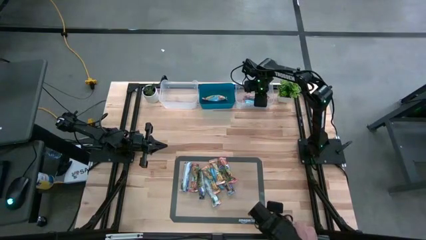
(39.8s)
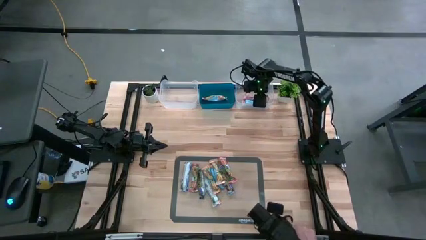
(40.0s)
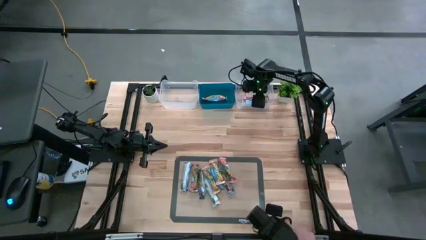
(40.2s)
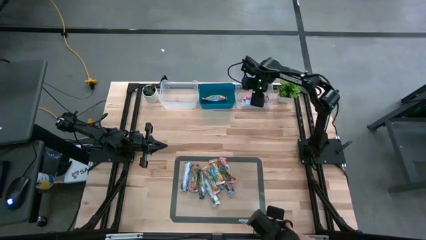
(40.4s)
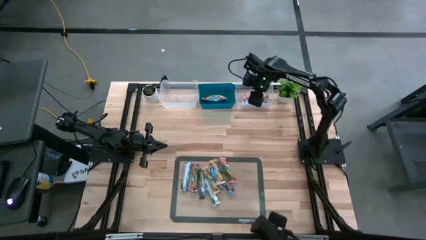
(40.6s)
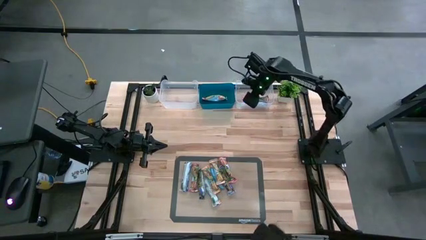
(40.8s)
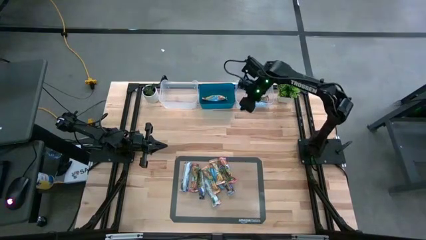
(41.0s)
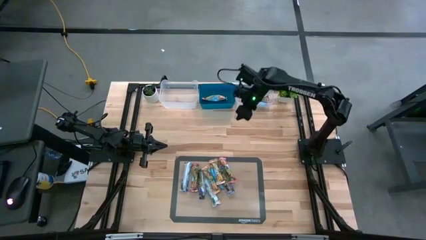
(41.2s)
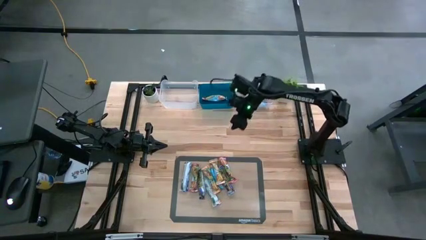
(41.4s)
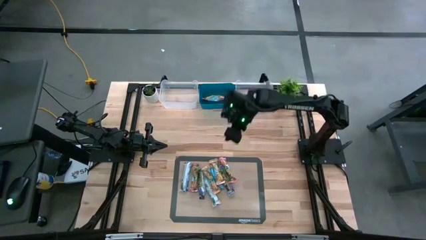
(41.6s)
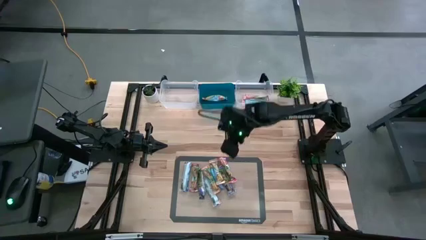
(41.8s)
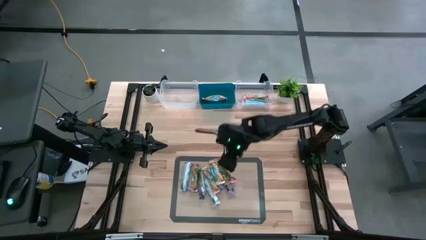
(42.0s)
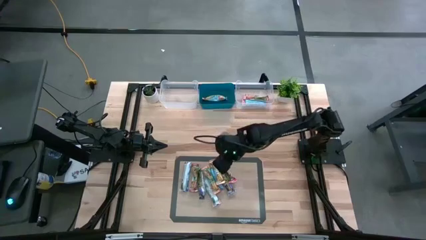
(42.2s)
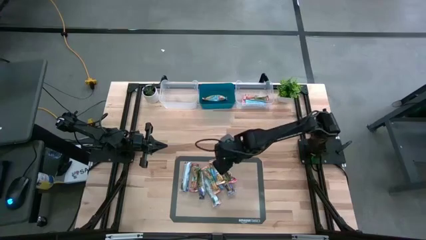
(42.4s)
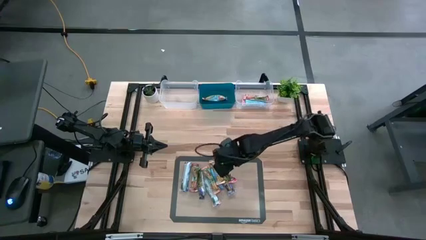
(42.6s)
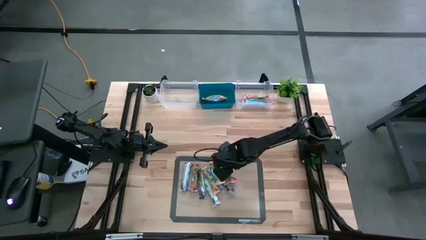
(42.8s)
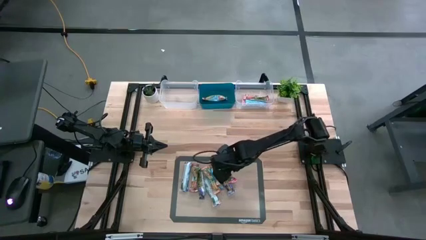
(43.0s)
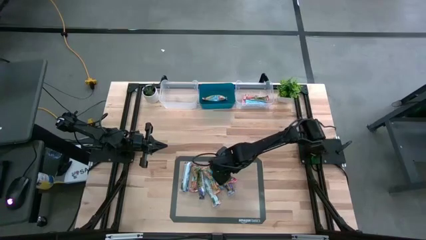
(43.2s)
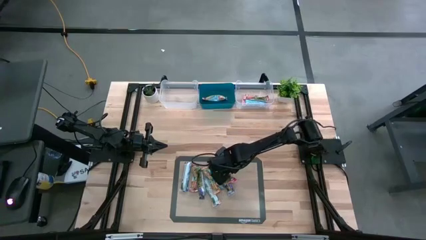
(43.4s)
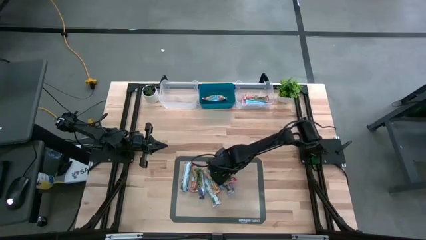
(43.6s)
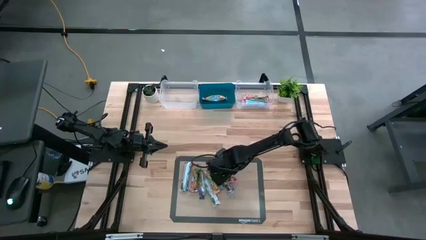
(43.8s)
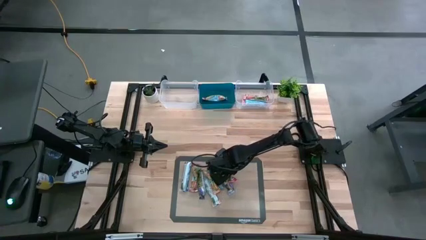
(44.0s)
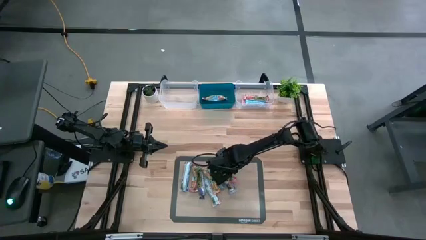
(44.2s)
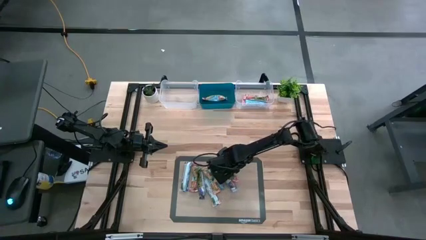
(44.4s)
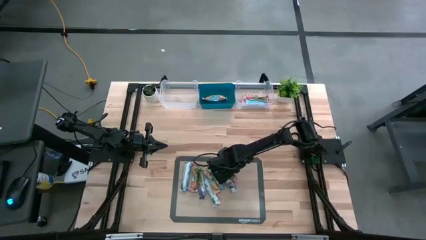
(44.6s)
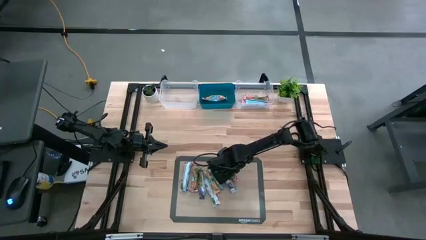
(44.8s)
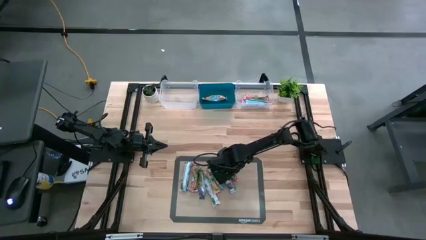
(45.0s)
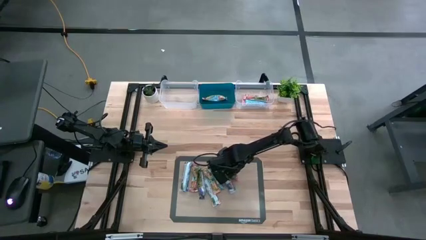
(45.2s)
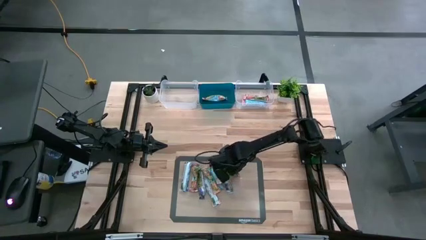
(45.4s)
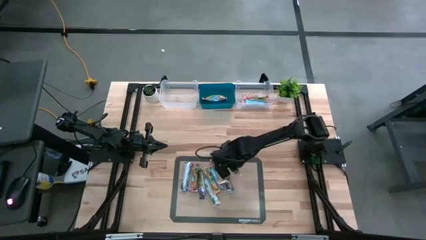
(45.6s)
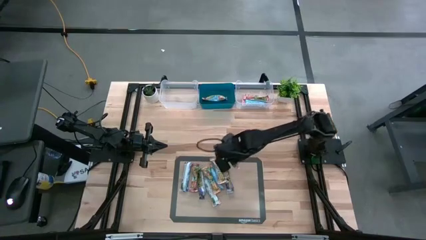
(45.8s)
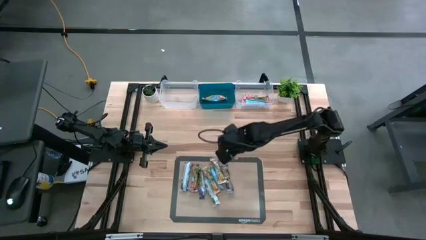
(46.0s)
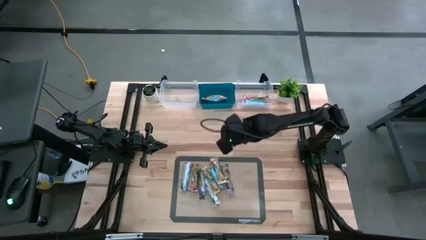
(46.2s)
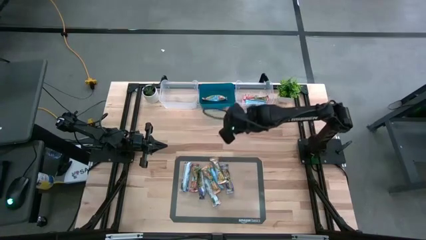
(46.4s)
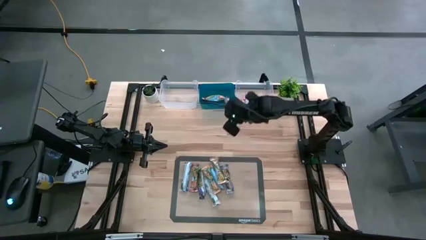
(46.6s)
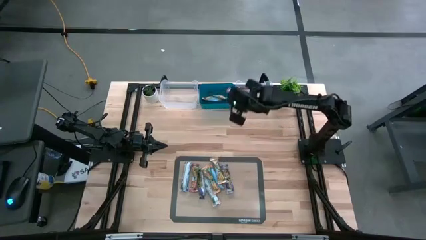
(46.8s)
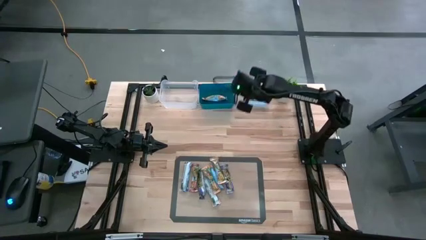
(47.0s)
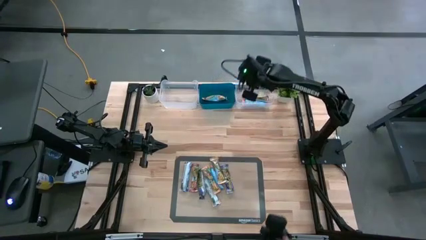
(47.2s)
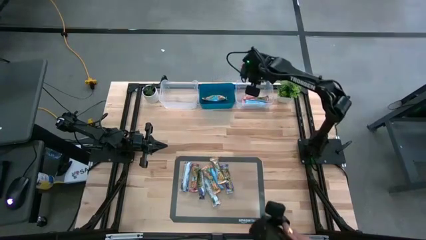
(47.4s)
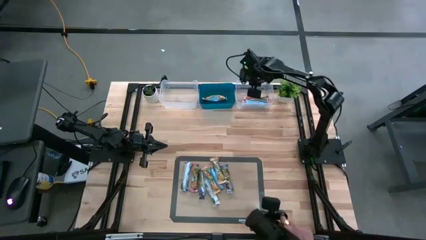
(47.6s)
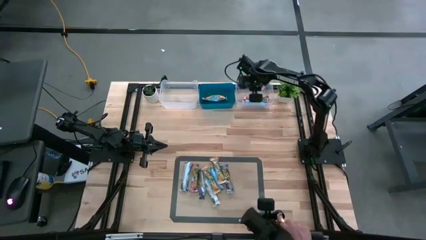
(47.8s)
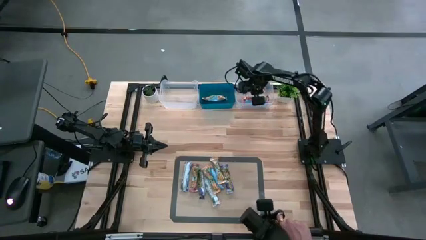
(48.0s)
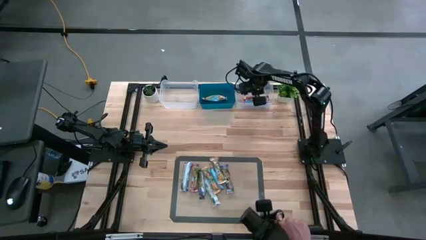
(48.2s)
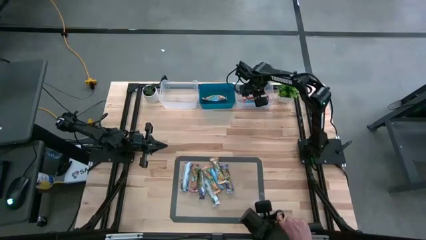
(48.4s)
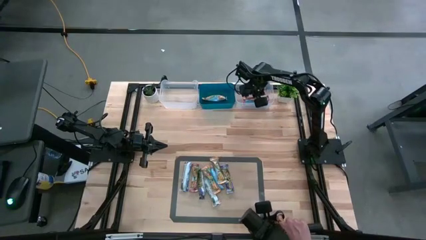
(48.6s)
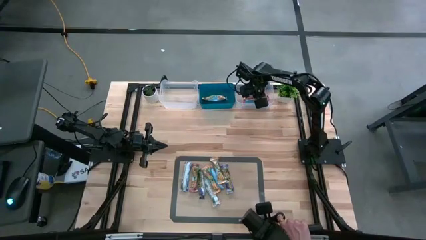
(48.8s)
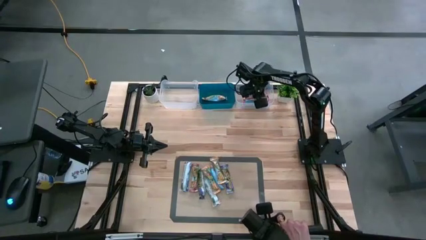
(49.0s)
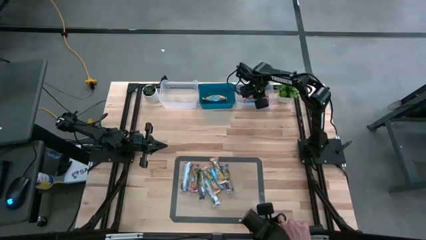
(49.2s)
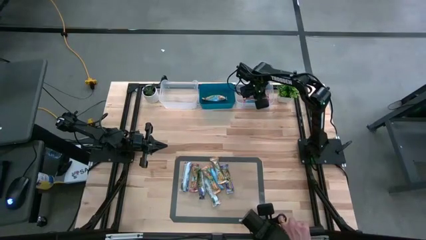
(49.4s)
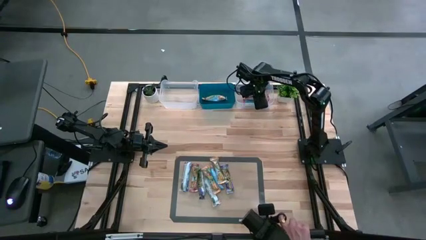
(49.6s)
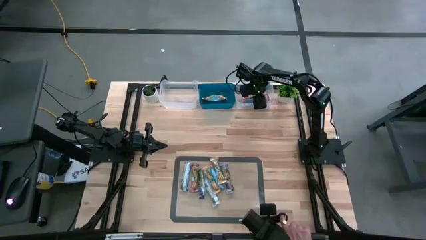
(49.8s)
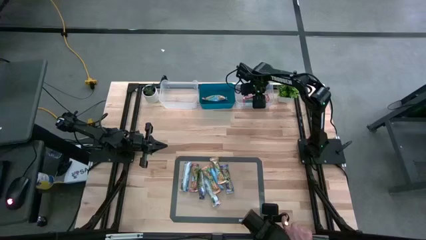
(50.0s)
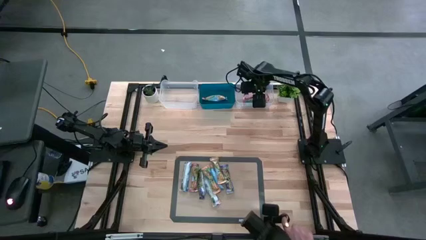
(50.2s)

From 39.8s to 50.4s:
Task: Pick and place Granola Bars by type
Put the red granola bar into the right transparent bin

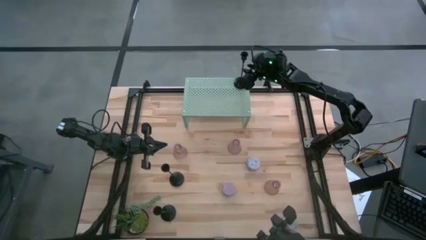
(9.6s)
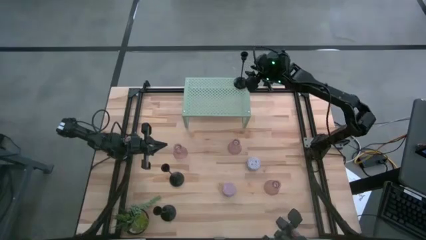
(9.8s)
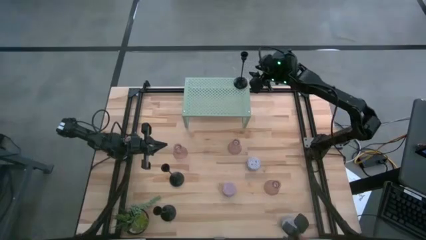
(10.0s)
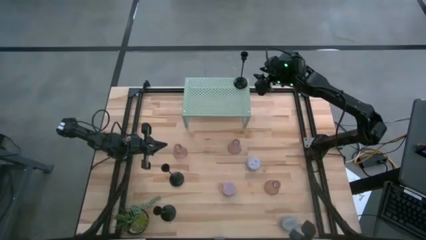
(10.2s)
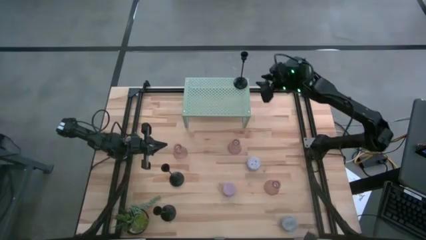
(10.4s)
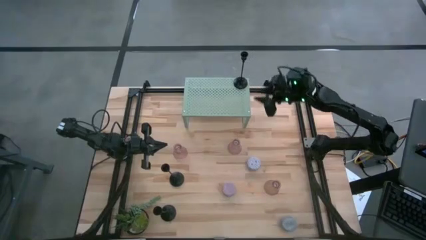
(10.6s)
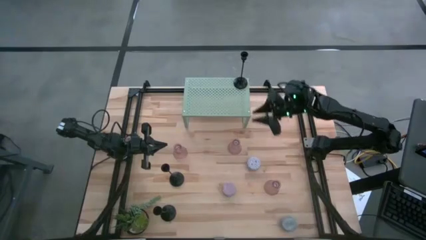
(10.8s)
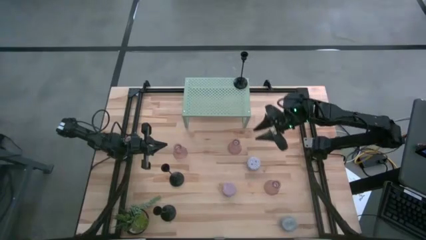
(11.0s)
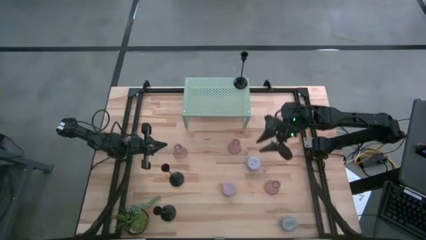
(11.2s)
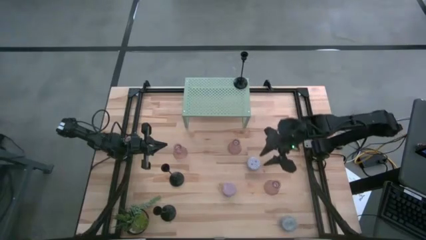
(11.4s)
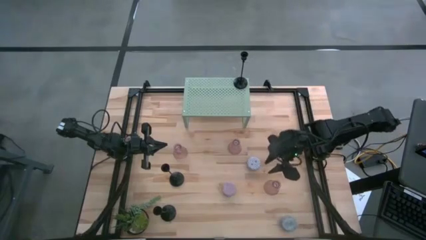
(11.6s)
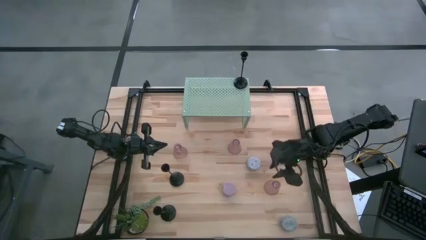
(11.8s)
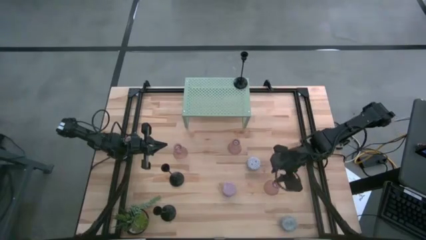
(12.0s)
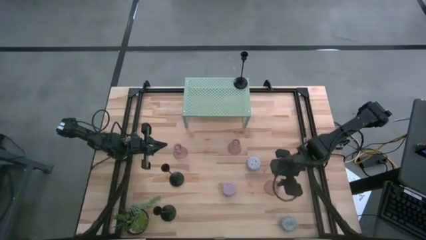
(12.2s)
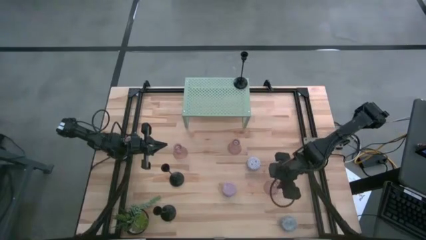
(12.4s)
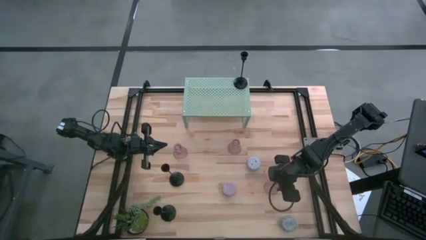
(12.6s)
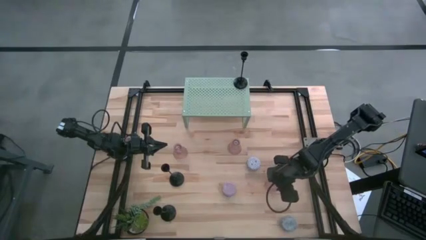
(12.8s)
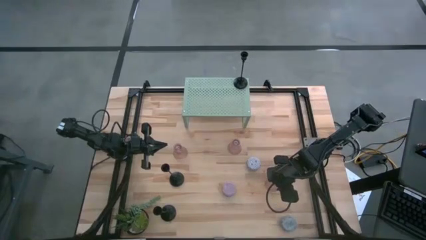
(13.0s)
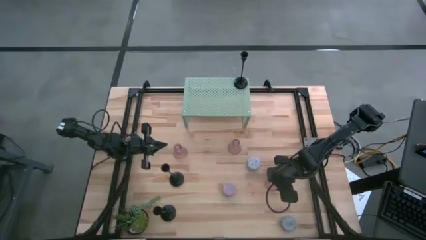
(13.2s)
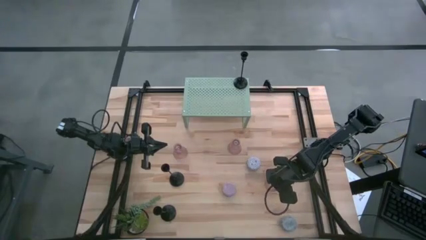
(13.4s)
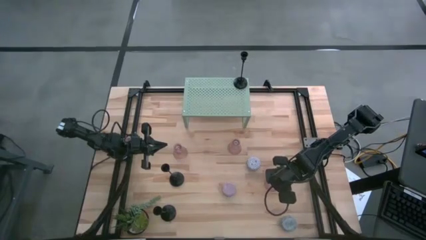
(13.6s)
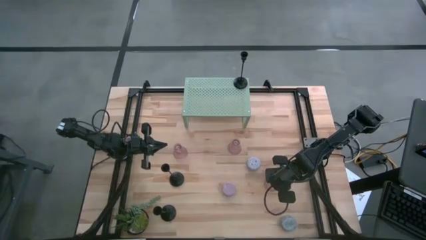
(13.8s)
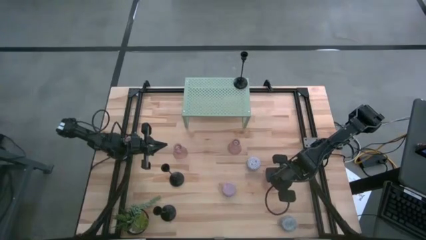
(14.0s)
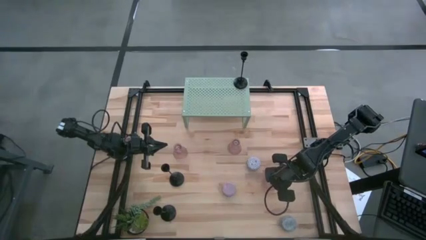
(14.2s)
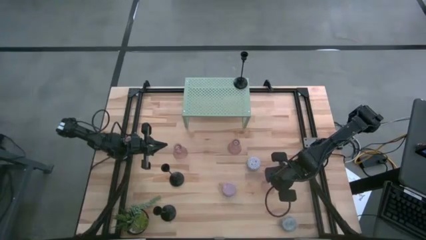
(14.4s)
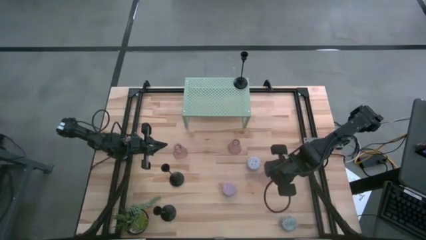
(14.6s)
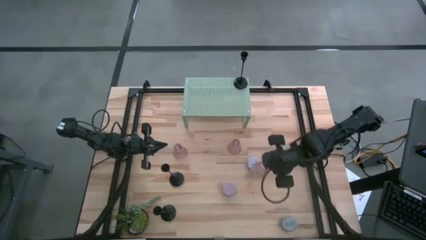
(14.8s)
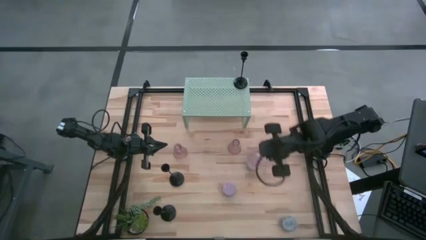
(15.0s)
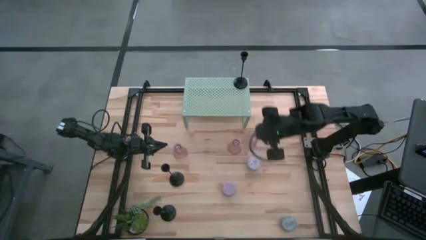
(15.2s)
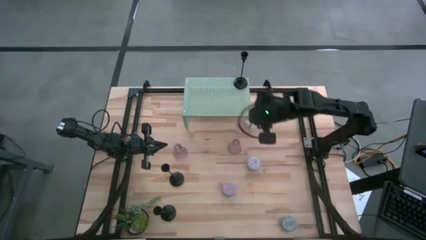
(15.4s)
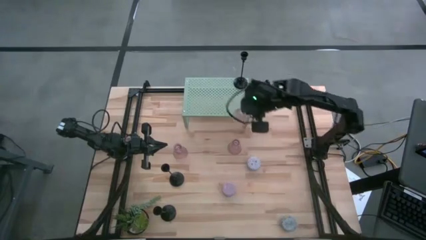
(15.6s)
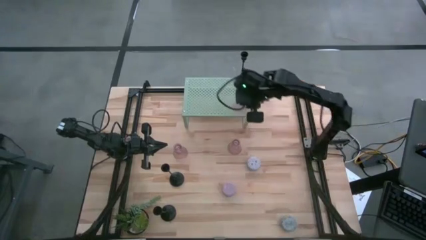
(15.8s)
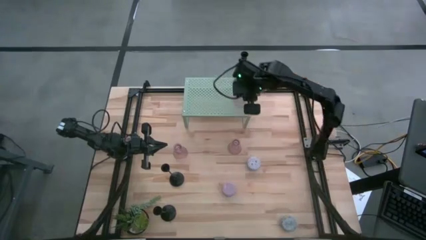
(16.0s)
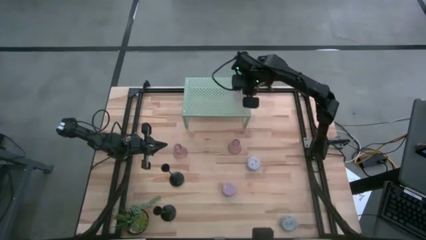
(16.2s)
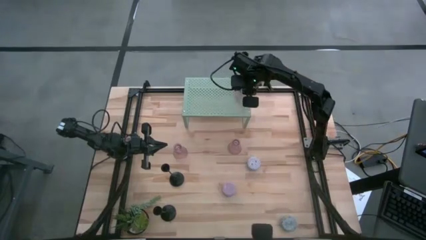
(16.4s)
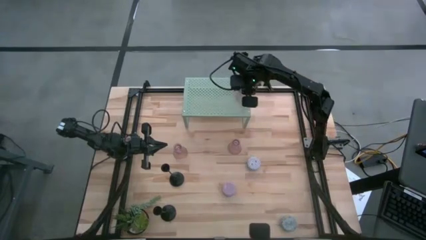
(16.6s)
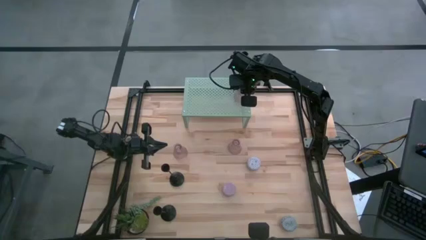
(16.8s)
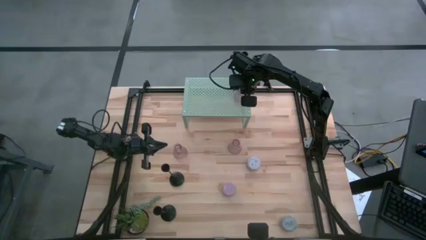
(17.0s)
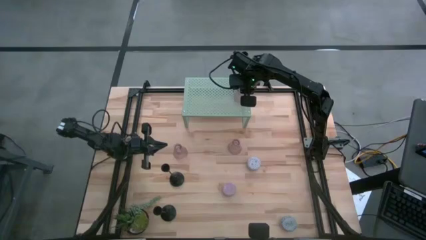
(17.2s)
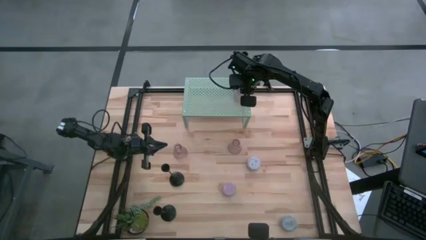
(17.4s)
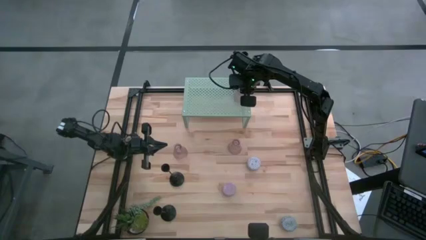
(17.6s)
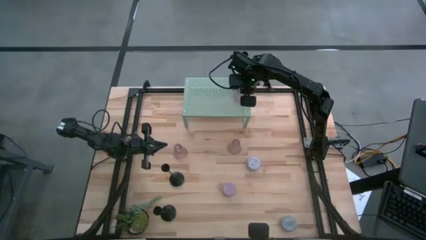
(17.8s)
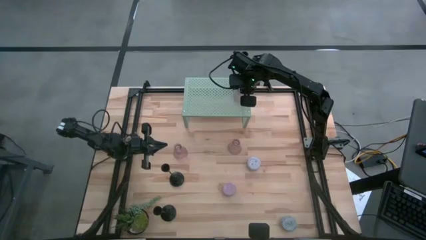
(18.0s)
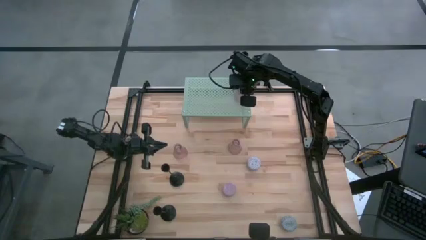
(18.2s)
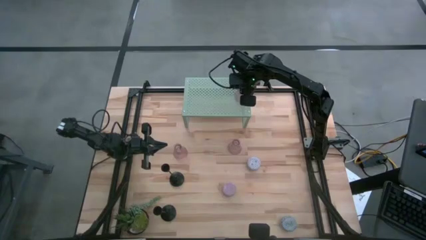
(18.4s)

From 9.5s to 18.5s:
Task: Pick & Place candle stick holders
Put the bottom pink glass candle holder on the shelf
